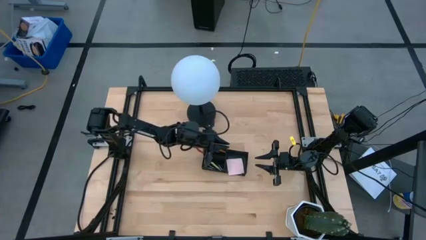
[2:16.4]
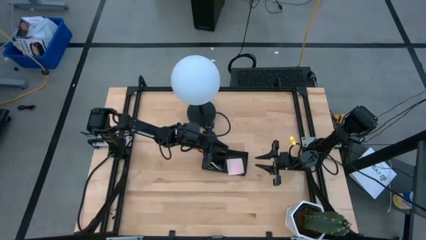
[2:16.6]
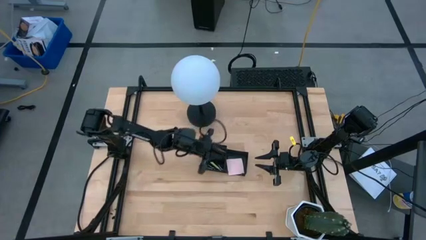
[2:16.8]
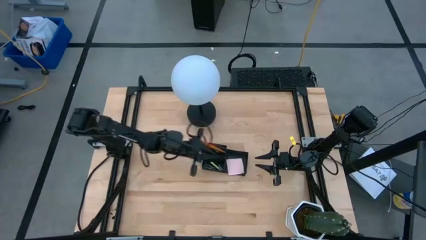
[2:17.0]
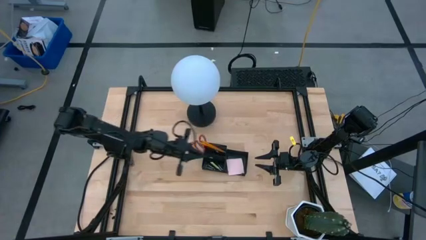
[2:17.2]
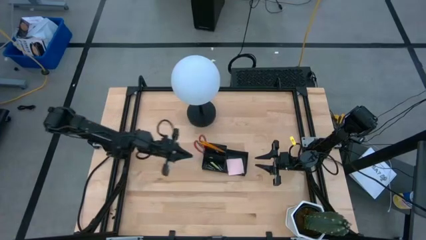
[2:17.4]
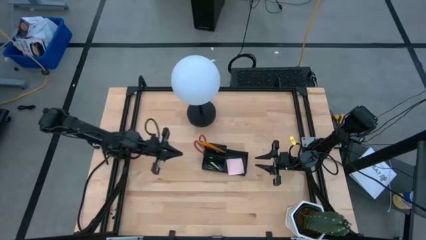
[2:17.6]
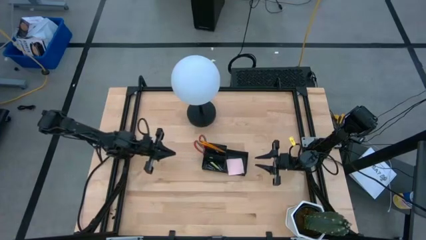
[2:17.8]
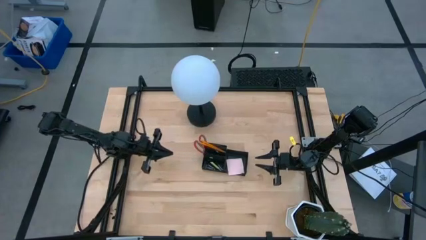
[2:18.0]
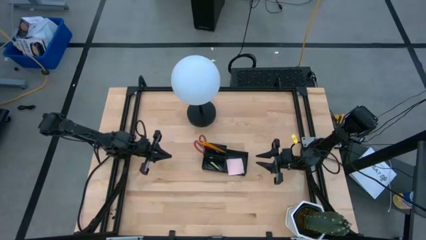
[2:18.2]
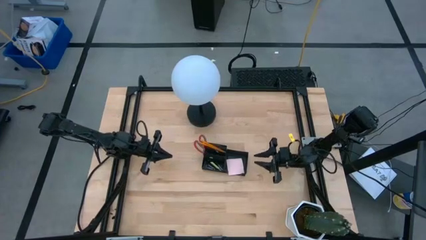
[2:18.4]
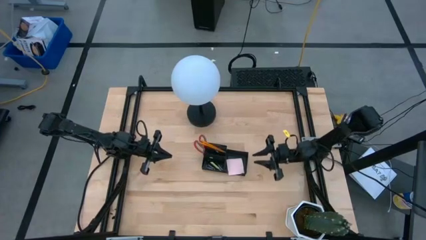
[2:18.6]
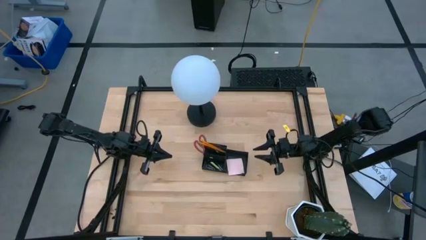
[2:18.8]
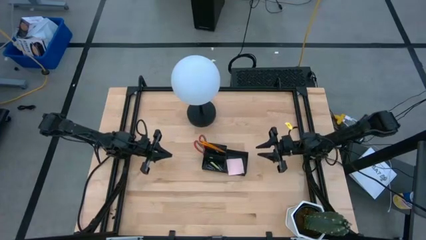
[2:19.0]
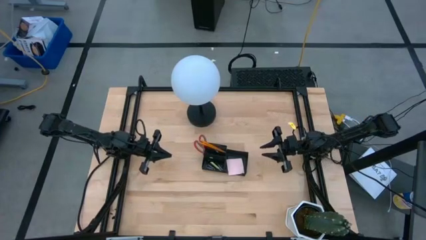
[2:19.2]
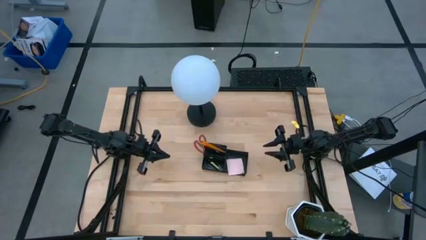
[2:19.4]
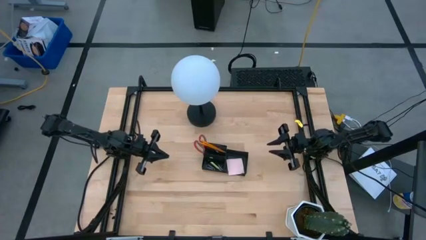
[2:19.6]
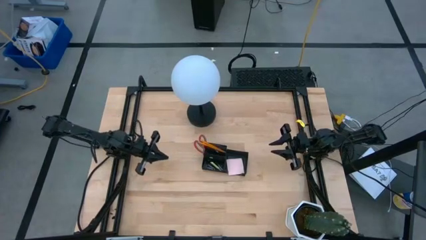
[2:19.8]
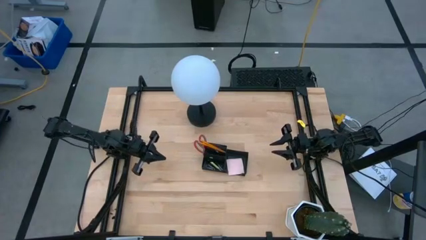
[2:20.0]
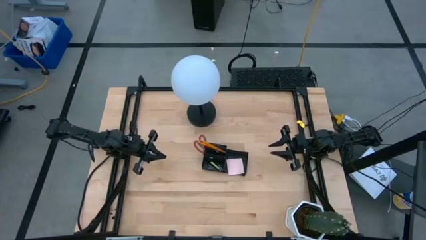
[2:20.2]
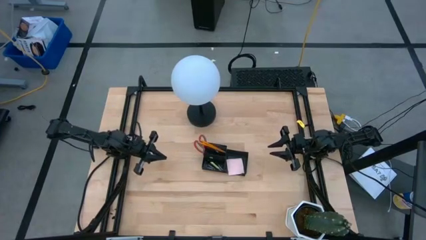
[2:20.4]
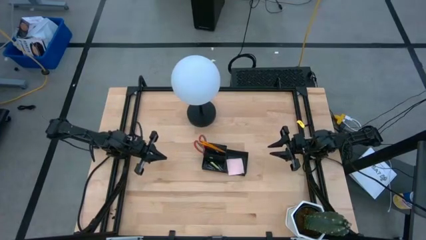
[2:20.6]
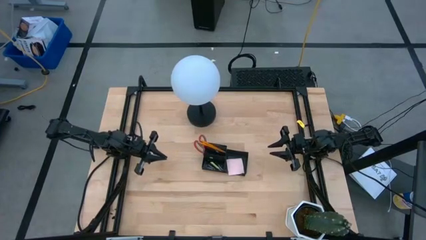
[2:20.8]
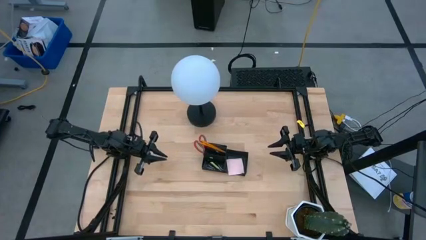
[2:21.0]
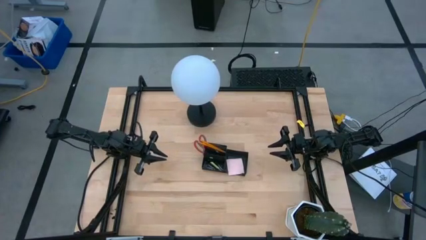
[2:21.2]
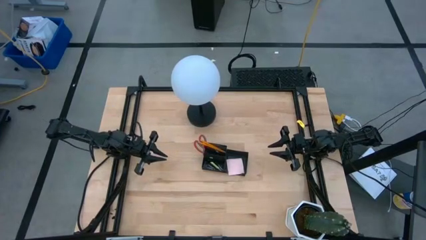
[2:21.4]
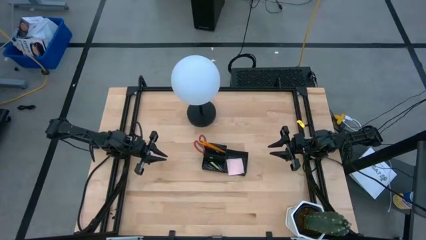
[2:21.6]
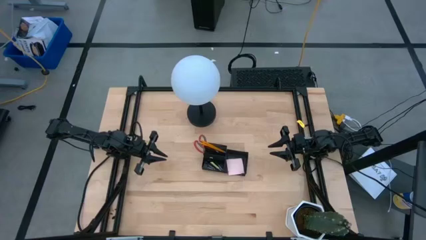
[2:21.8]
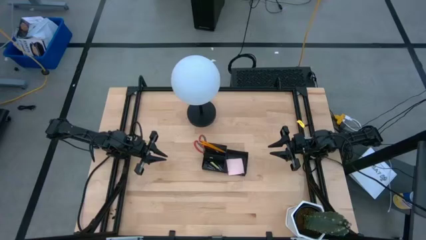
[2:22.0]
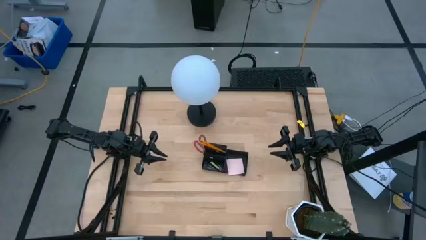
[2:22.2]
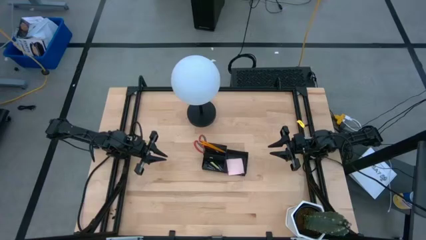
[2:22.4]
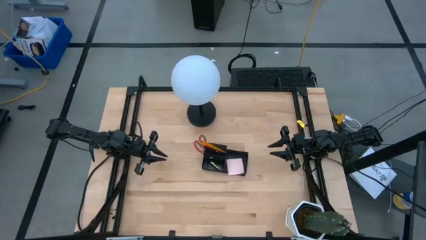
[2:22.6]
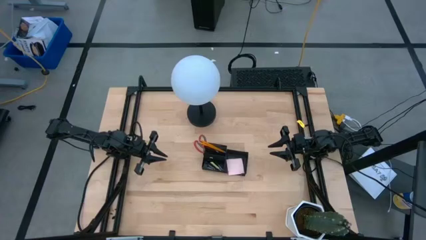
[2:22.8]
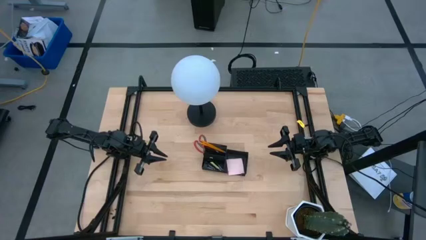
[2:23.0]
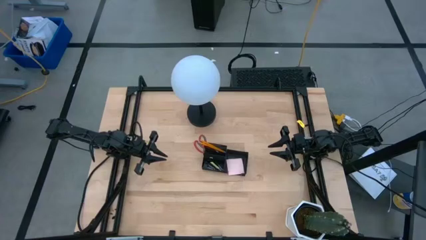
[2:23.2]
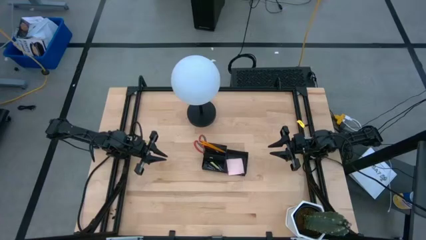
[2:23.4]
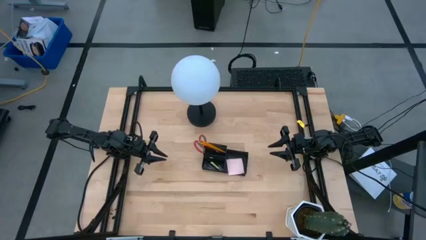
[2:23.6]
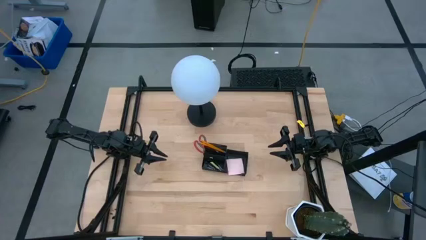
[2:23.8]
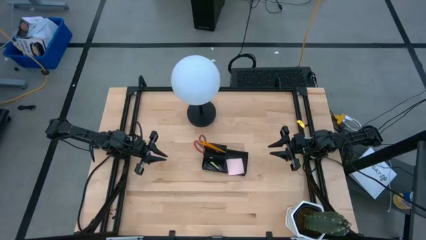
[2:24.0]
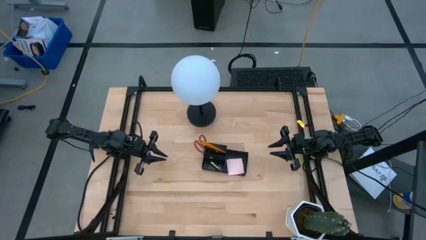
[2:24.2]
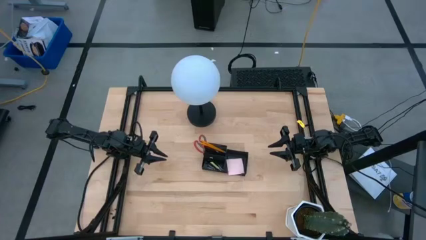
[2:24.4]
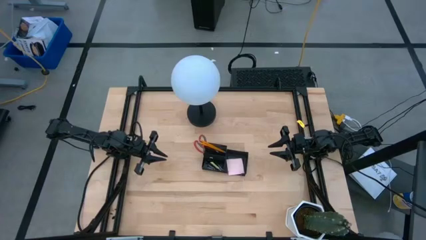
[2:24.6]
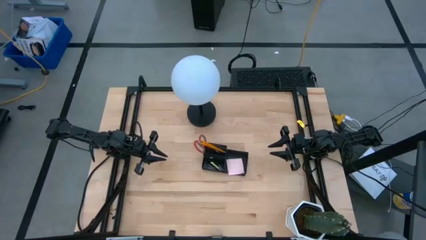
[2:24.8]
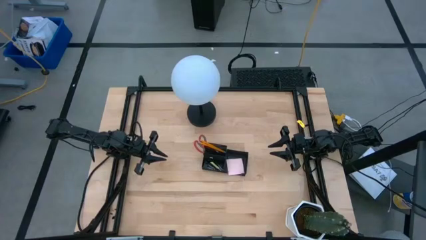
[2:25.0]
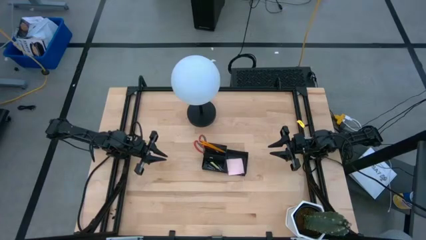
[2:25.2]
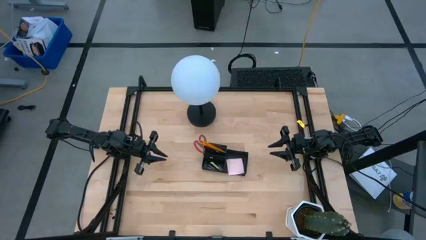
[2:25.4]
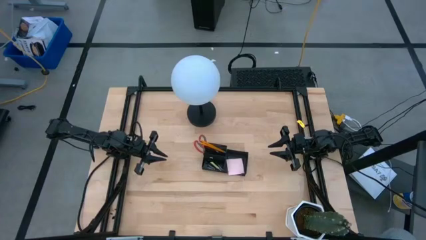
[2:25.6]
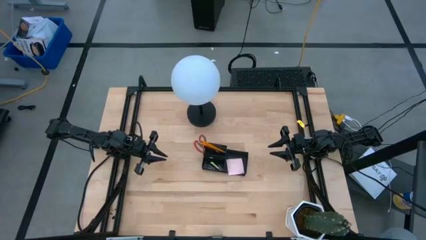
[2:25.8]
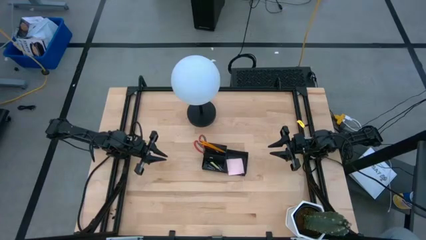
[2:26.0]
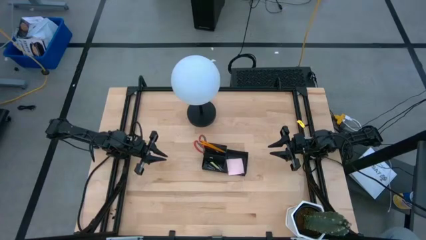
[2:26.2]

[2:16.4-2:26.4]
Task: Pick and place office supplies into organizer
Return to Home Position

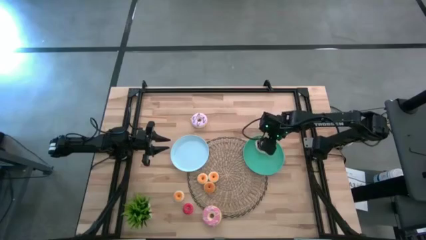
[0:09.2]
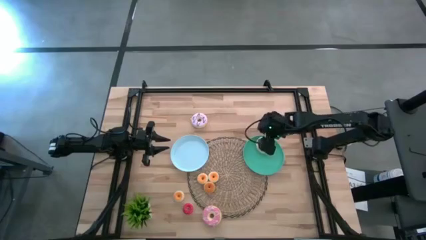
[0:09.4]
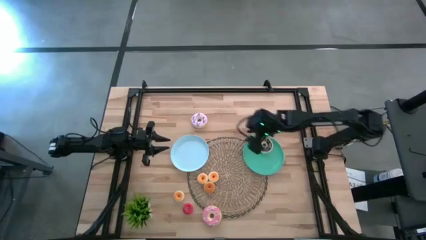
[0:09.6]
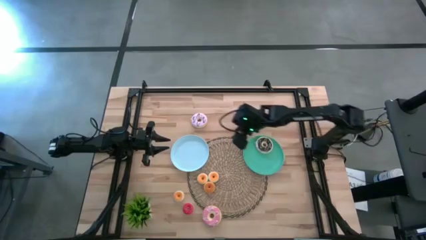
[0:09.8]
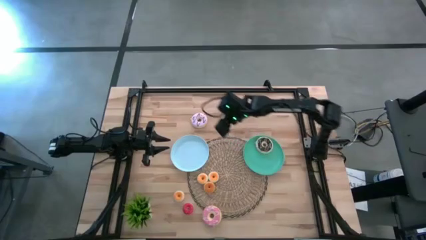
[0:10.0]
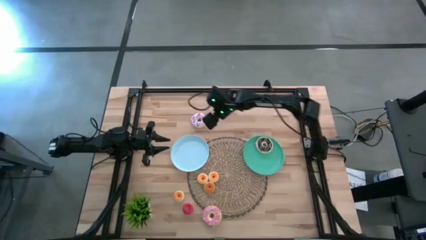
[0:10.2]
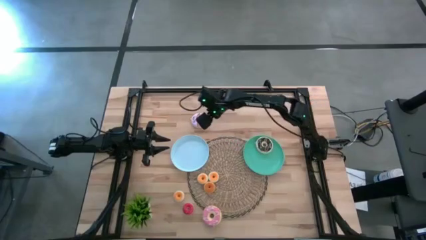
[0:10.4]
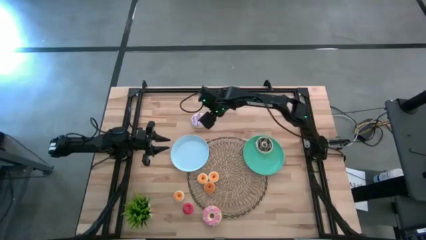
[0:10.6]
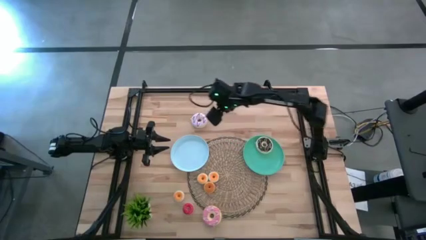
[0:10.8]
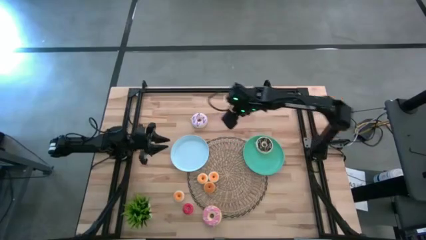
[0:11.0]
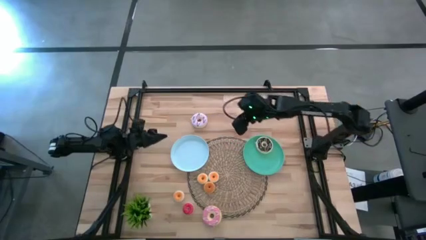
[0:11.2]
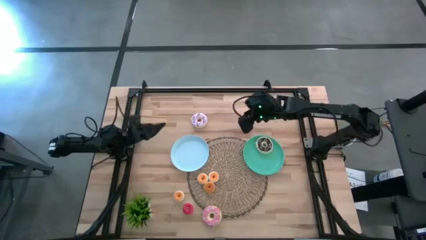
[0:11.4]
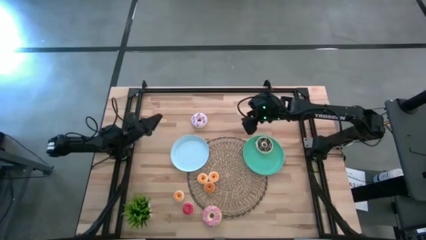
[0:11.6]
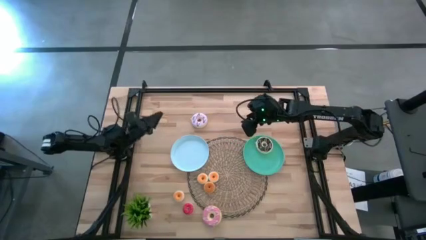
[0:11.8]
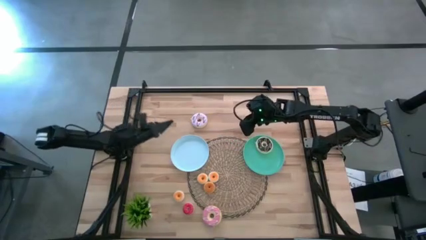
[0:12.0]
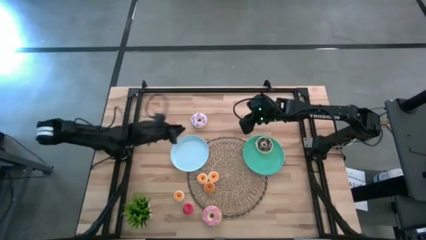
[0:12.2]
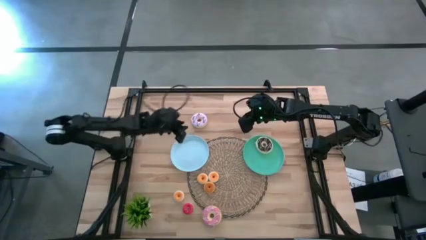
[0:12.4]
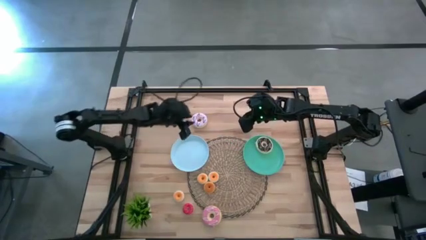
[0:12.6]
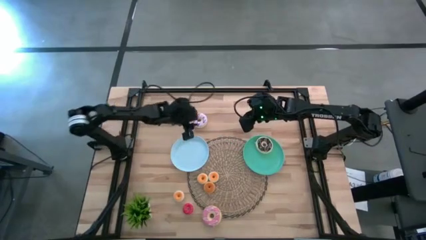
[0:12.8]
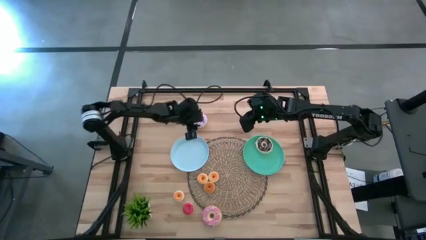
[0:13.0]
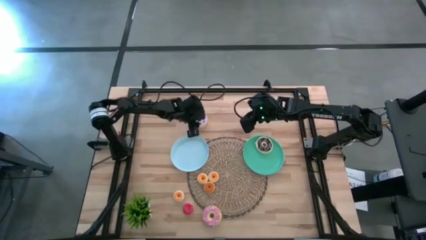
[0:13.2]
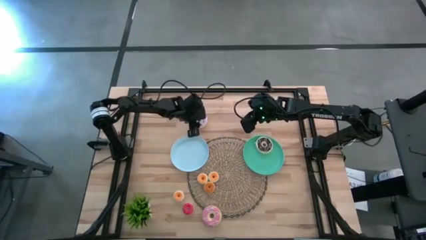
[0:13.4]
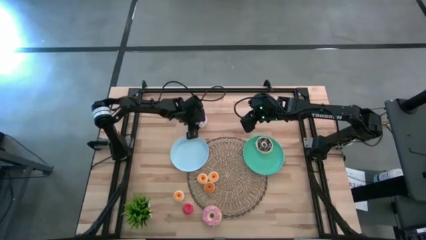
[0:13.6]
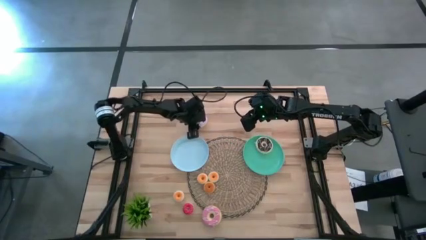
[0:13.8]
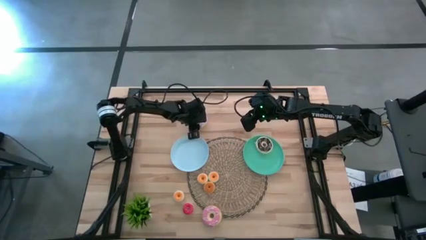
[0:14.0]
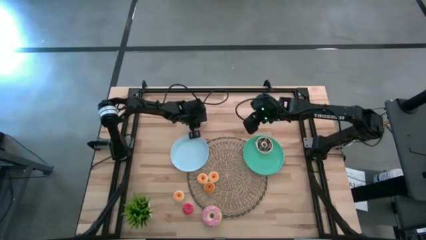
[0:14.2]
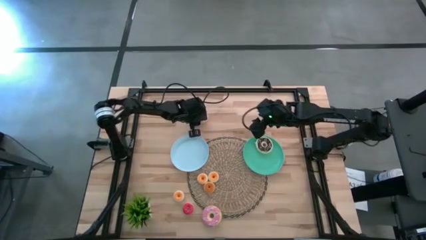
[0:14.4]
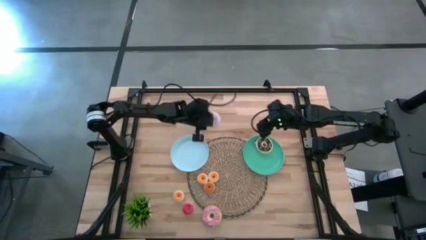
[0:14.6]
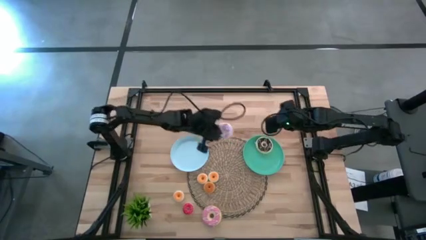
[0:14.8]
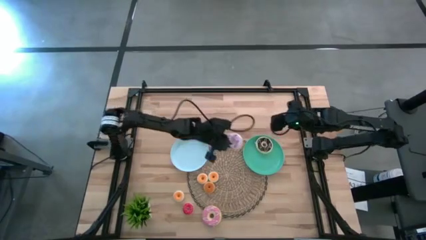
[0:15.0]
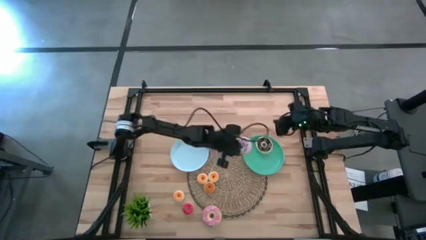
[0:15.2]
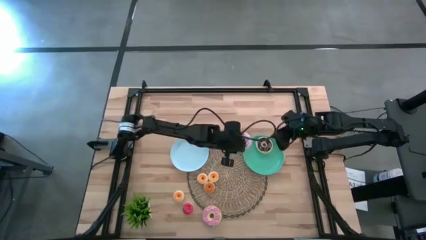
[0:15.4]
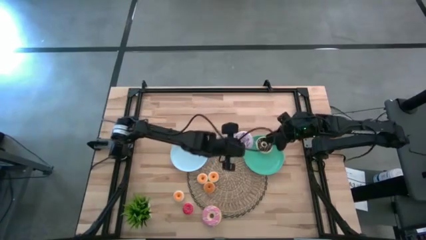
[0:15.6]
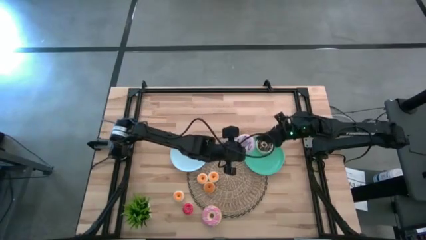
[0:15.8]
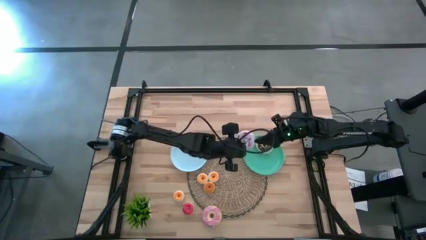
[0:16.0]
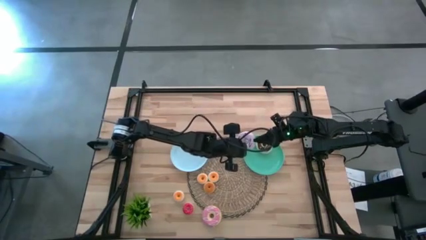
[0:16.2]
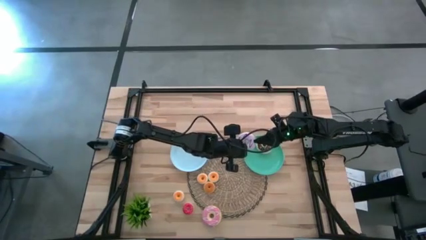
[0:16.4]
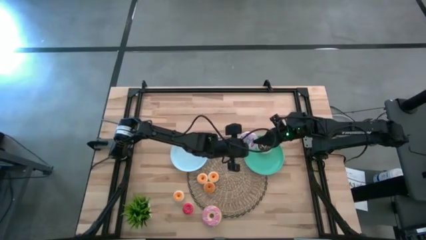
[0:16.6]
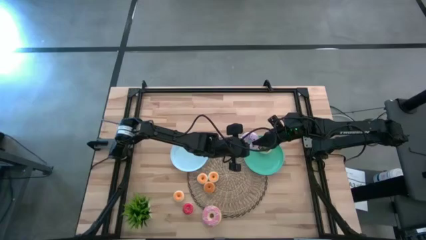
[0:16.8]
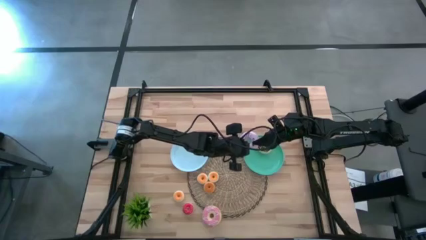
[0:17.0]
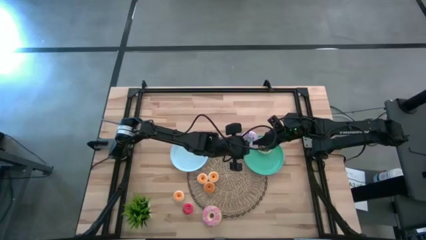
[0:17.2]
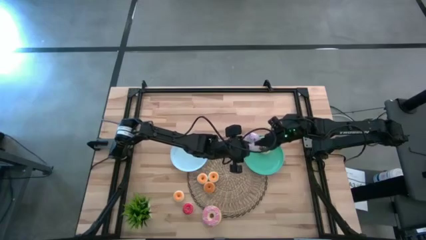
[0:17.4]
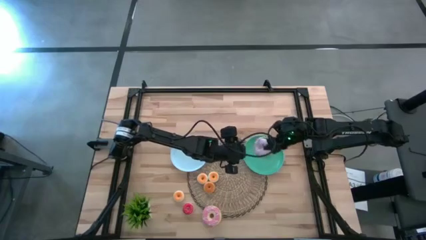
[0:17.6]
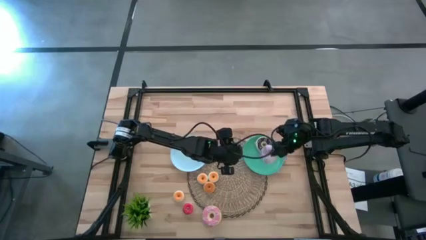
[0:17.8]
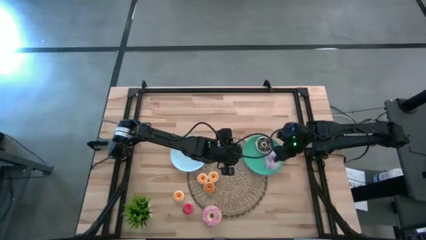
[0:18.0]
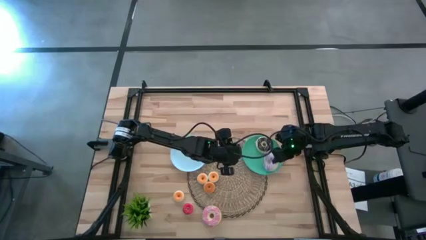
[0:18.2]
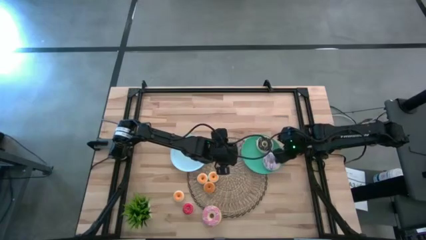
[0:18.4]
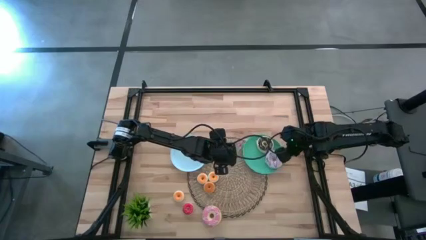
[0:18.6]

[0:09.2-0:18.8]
Task: Pick & Place donuts
Put the large purple donut on the green plate
